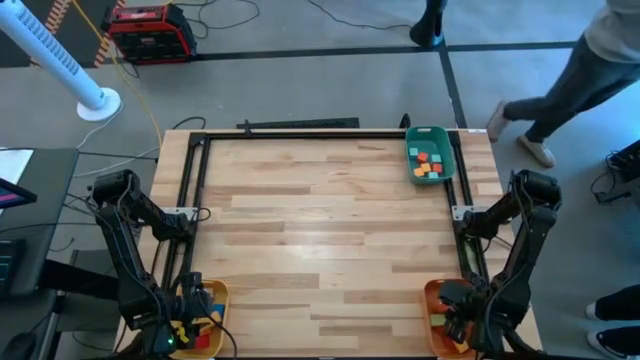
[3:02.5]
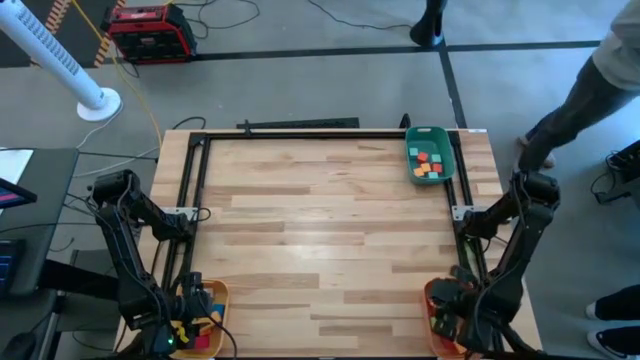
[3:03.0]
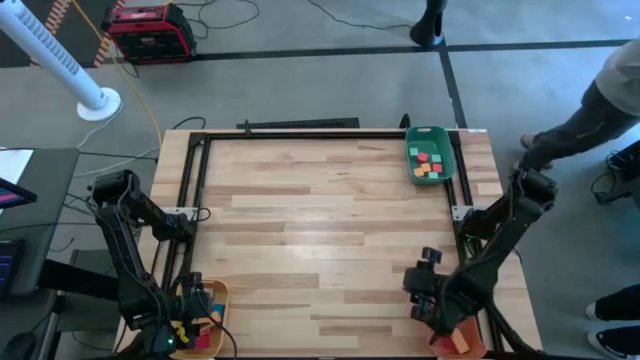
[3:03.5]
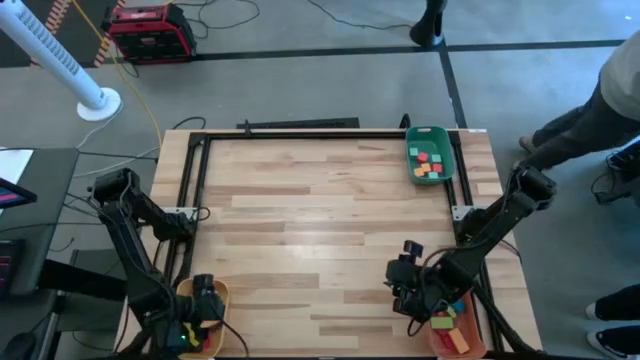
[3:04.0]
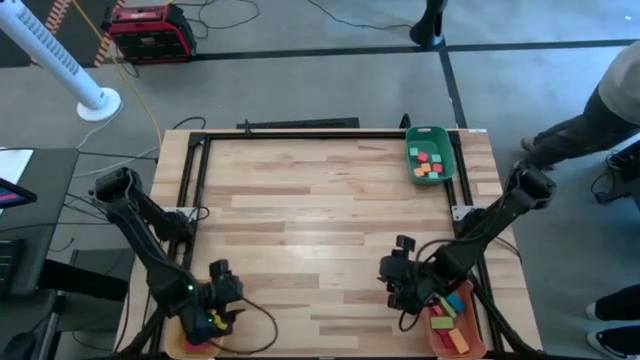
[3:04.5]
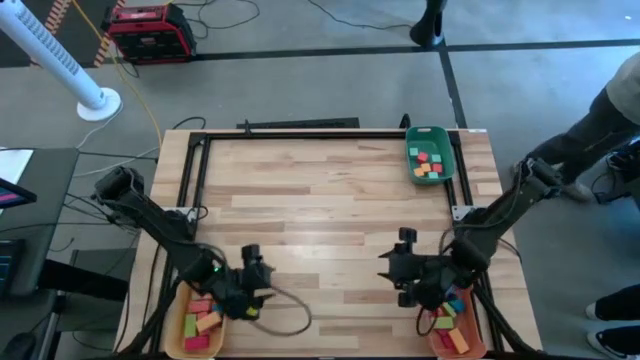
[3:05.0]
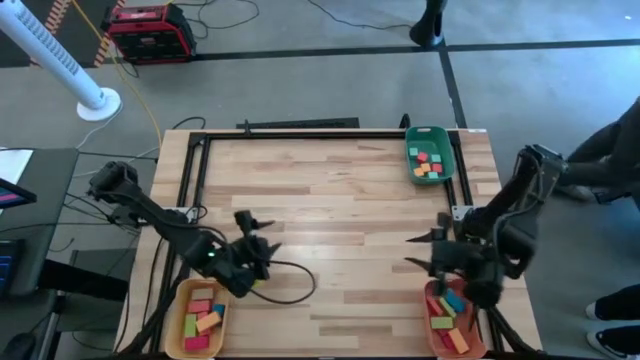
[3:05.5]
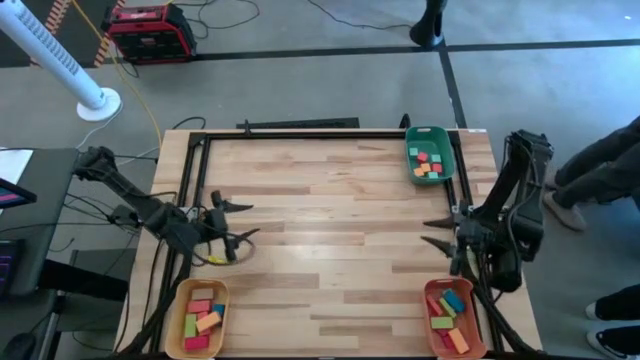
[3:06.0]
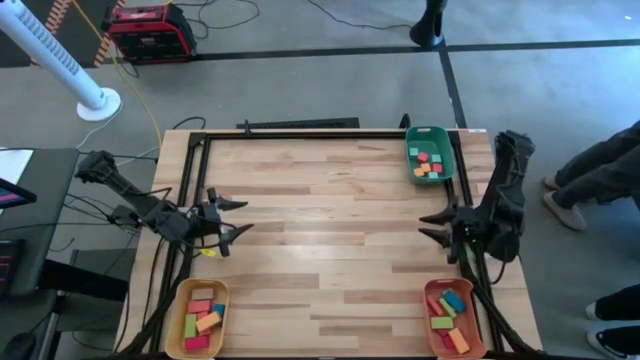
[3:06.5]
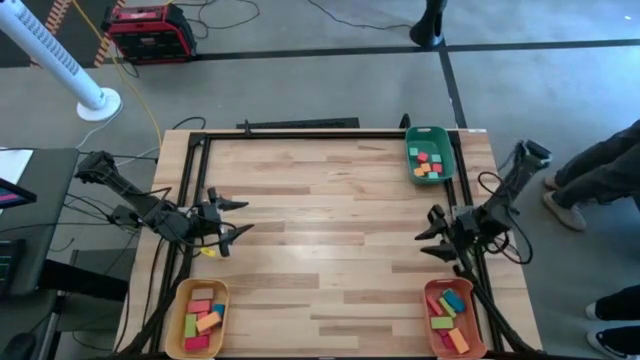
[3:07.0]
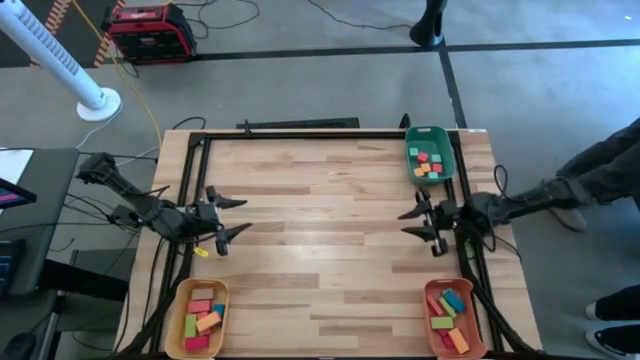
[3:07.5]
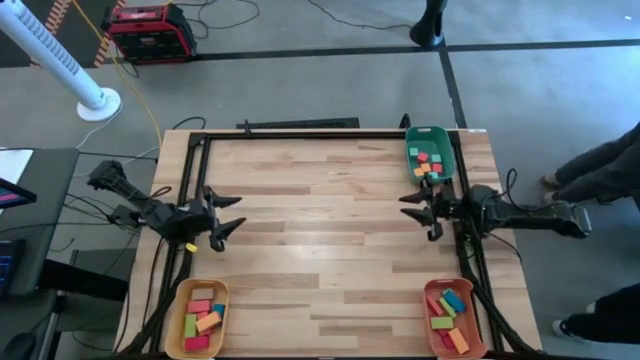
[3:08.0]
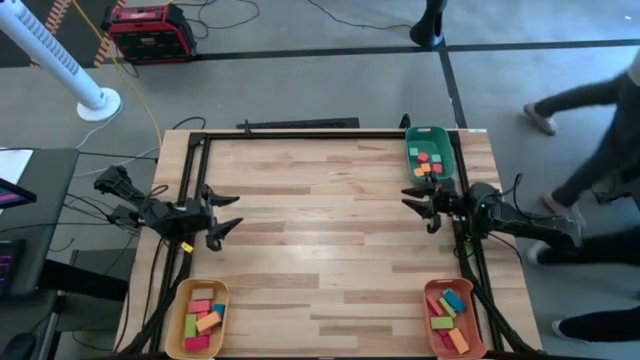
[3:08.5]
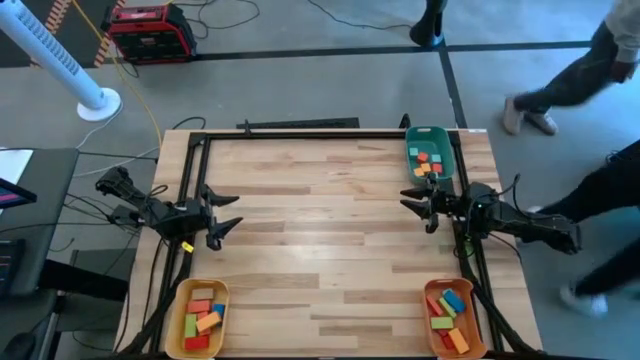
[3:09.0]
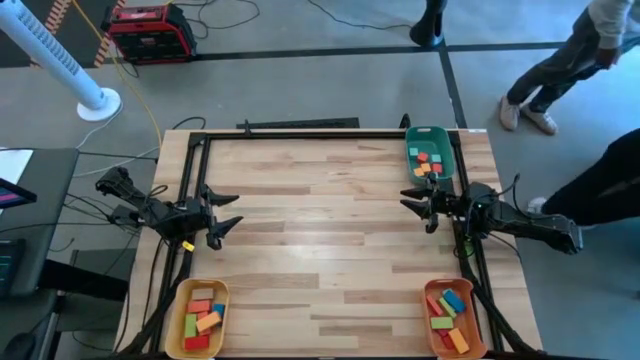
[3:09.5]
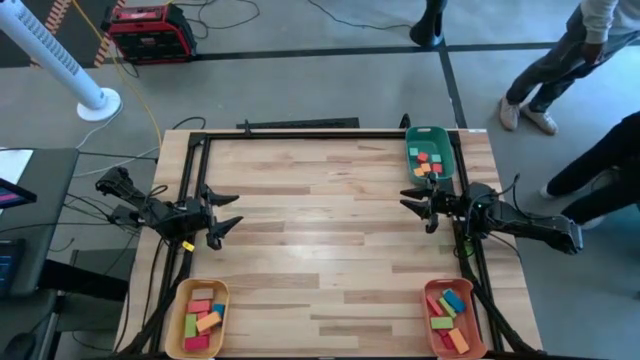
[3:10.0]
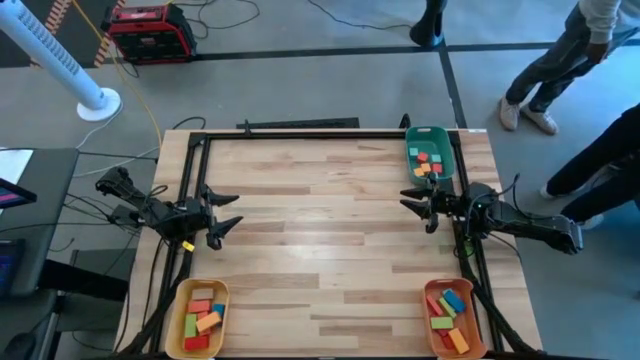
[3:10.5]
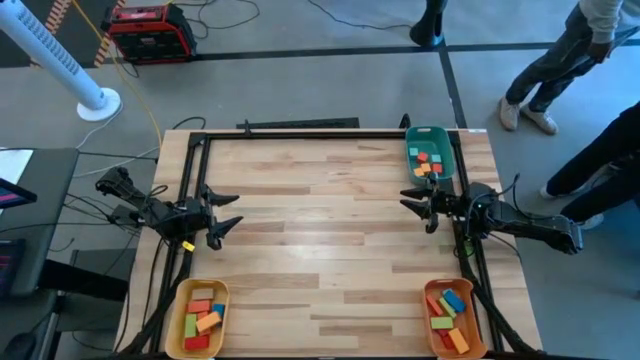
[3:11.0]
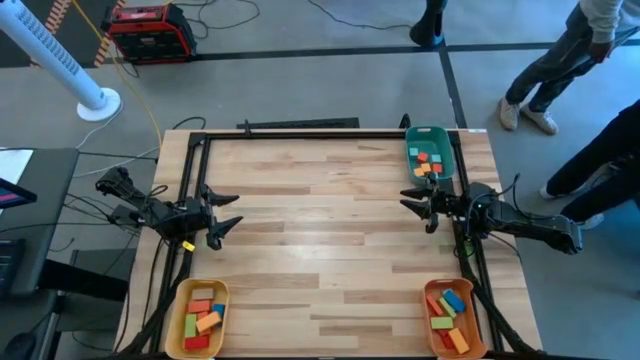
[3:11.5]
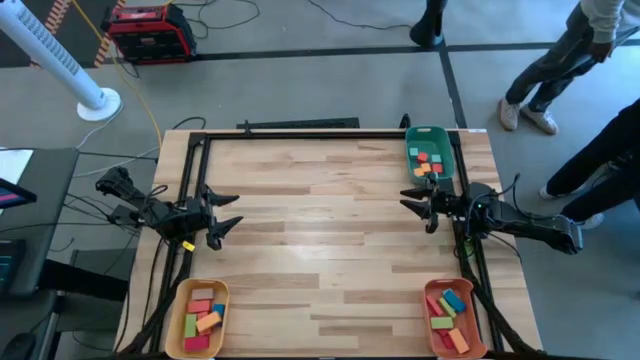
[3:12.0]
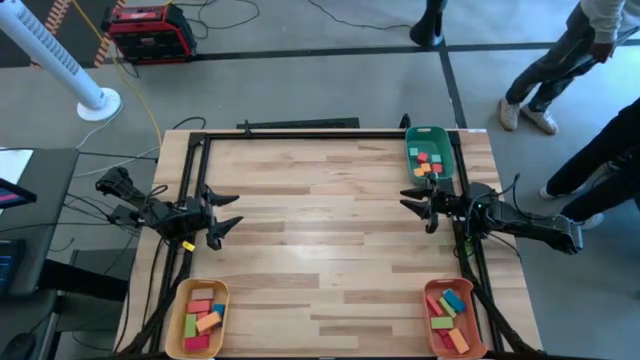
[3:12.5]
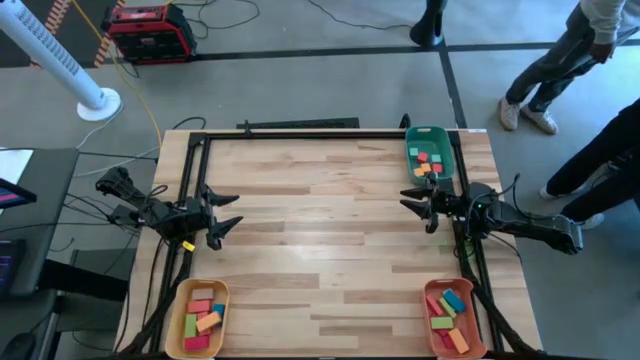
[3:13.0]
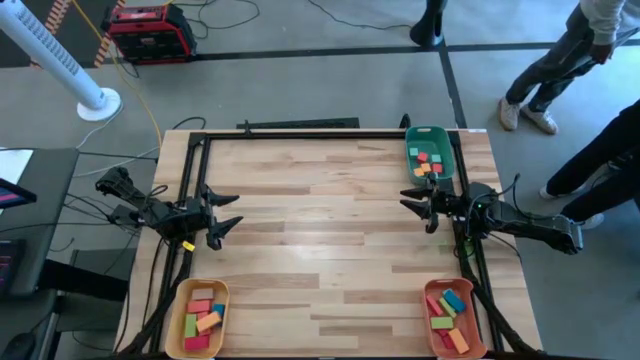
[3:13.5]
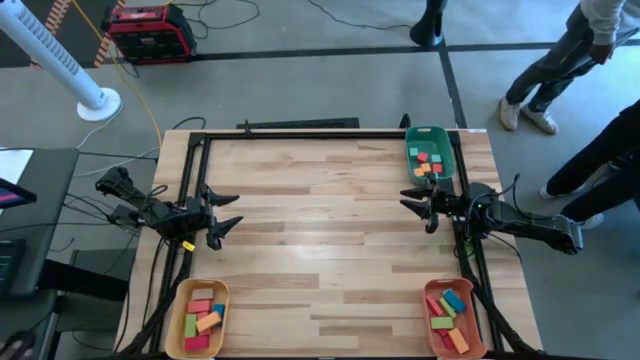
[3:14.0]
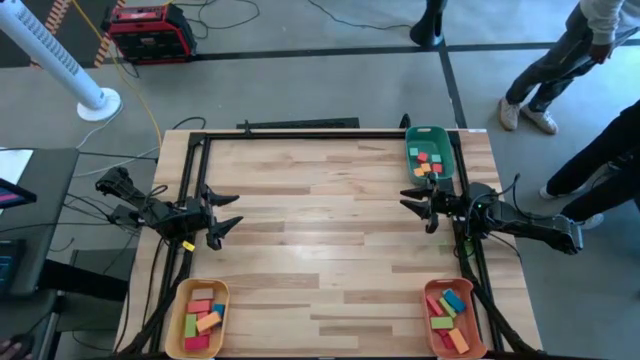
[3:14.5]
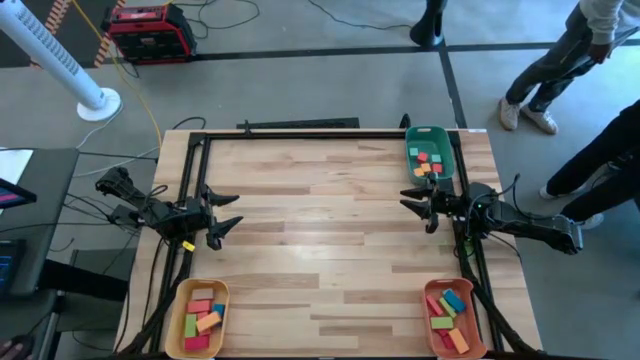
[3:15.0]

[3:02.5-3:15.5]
Task: Sort blocks by size
Return to Home Position

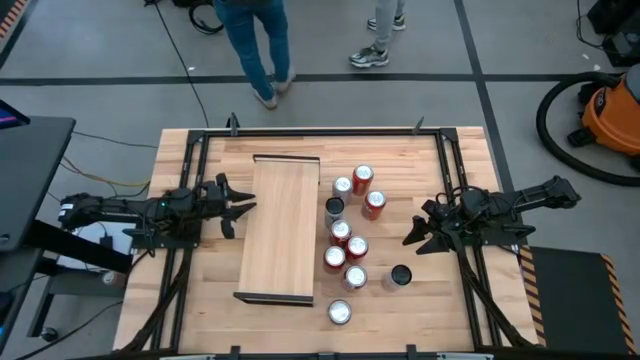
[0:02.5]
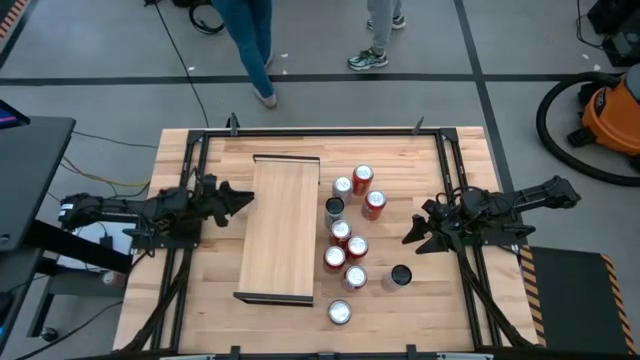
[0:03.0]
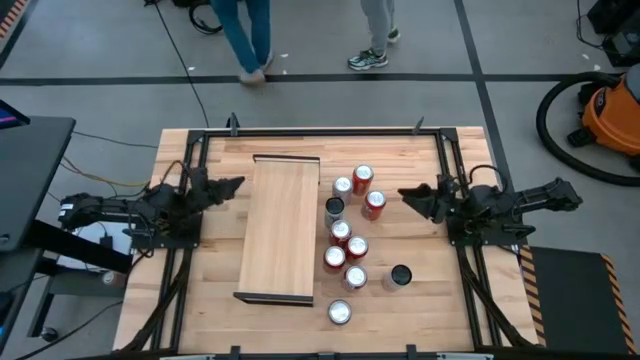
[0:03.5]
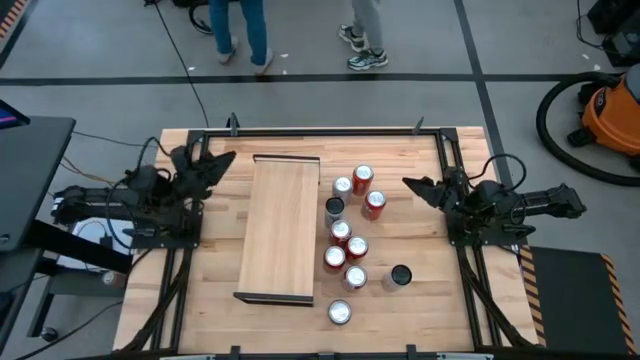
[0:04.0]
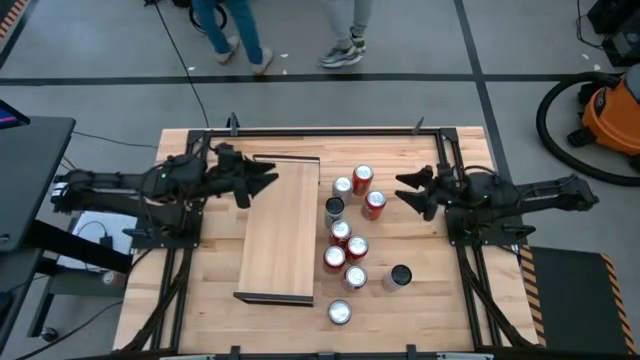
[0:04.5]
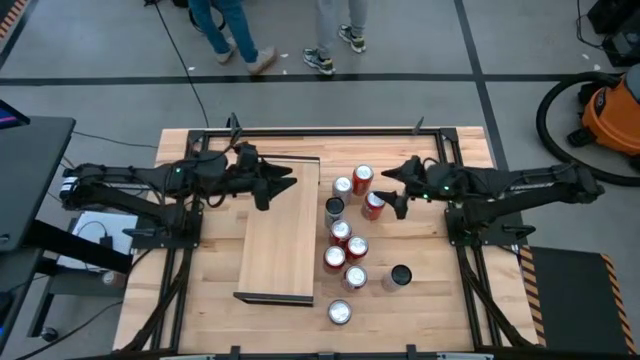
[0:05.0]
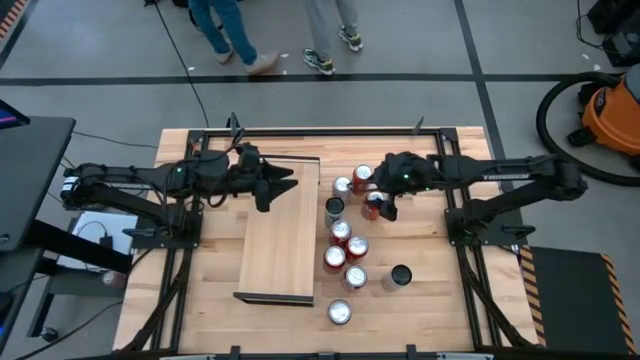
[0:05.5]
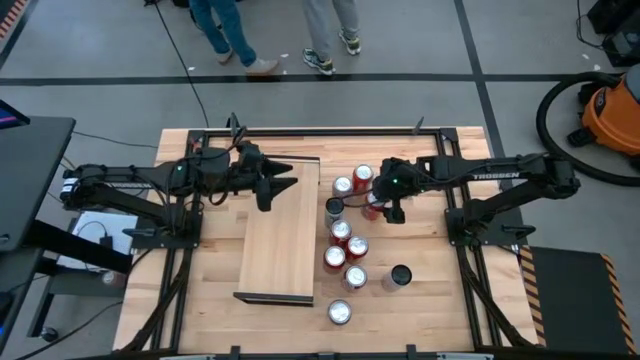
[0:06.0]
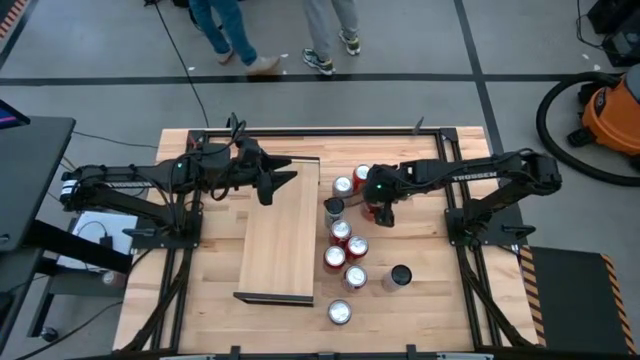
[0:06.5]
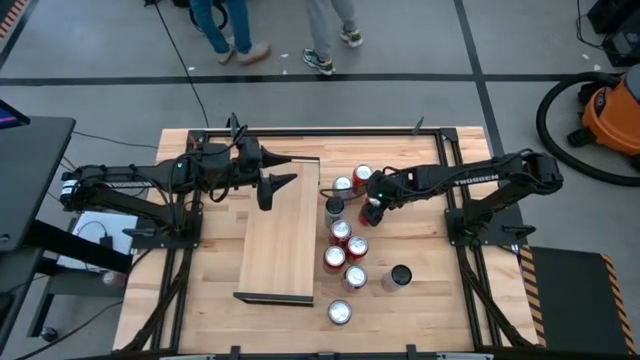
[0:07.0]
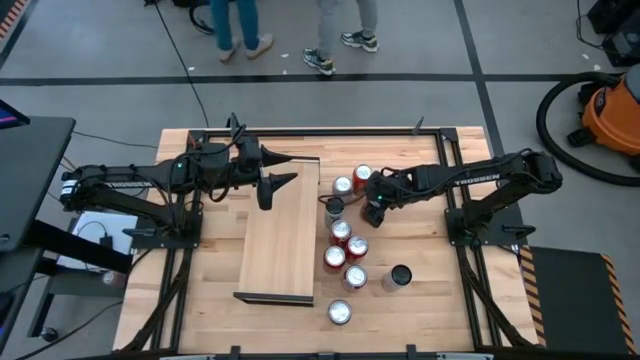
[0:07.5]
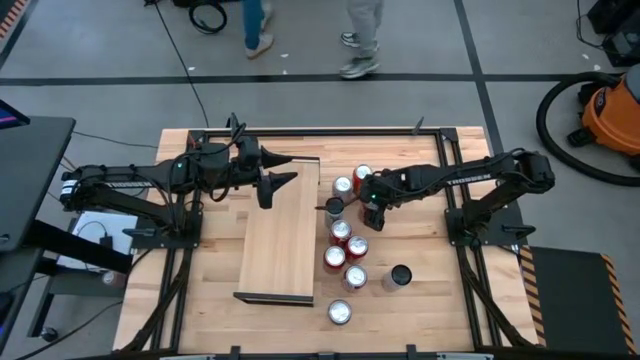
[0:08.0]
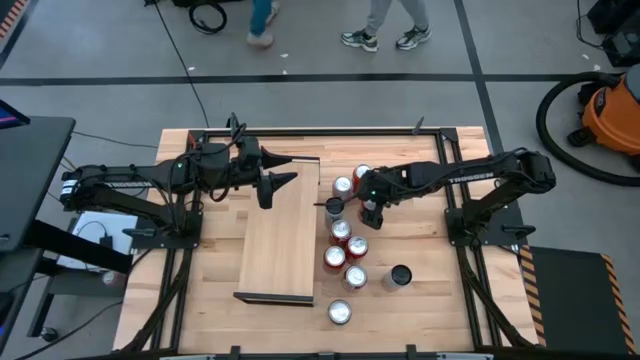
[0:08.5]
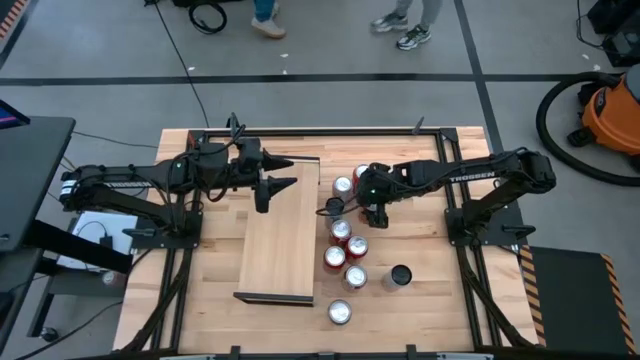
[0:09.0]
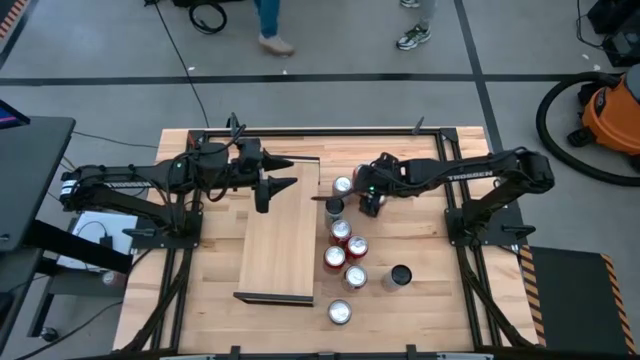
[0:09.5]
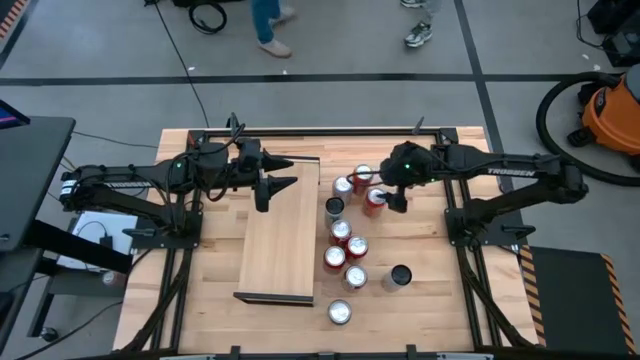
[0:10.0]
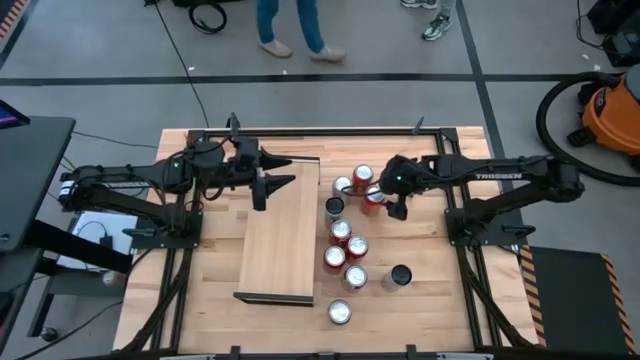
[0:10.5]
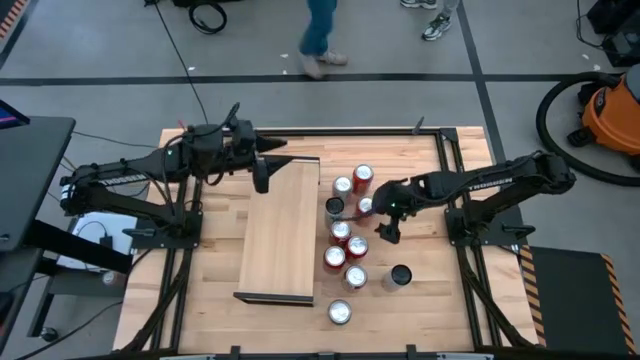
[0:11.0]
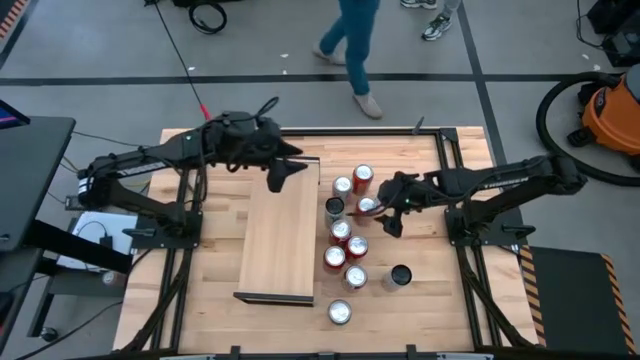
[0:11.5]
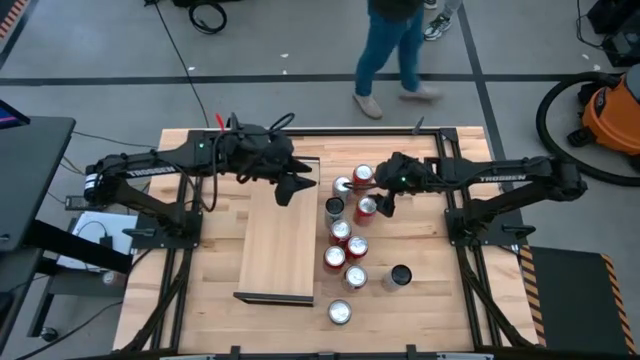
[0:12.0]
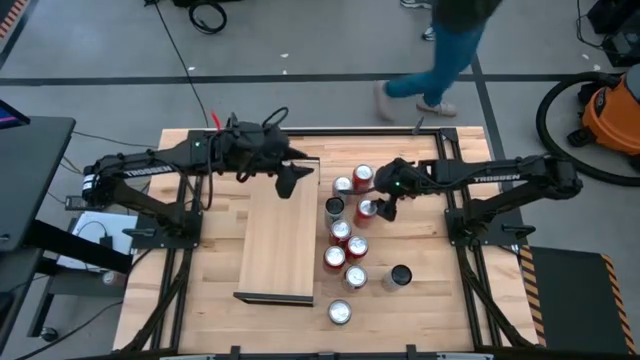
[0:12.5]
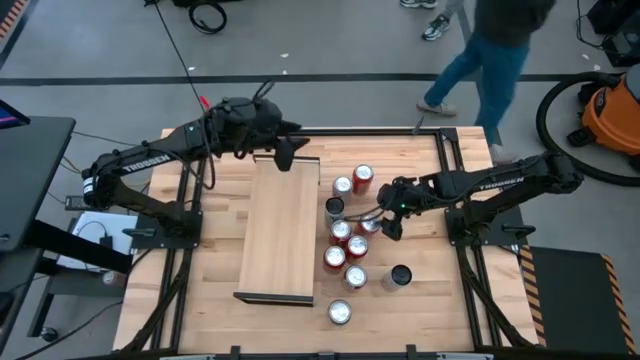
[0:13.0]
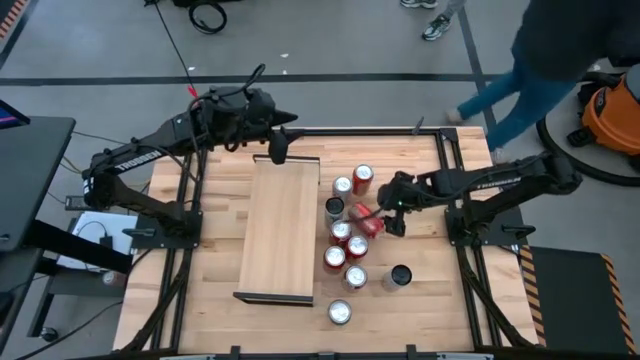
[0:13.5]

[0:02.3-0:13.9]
Task: Place canned beverage on shelf
Put the bottom orange soda can on the shelf
